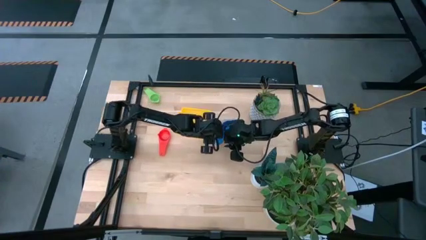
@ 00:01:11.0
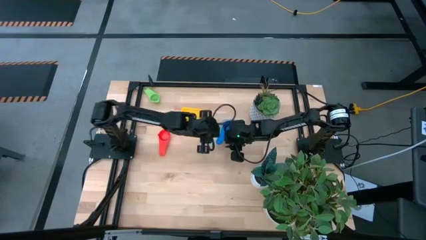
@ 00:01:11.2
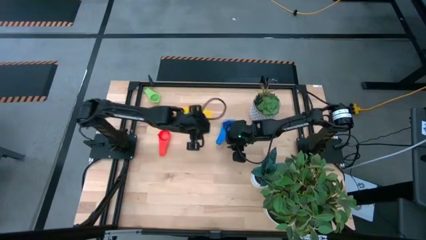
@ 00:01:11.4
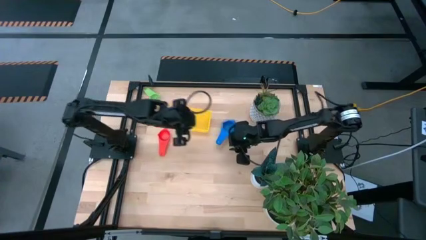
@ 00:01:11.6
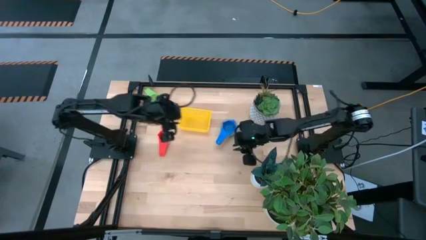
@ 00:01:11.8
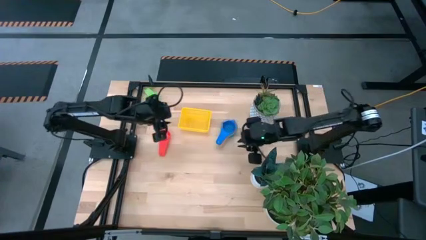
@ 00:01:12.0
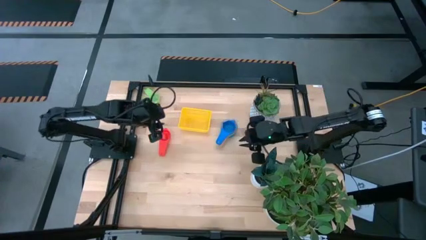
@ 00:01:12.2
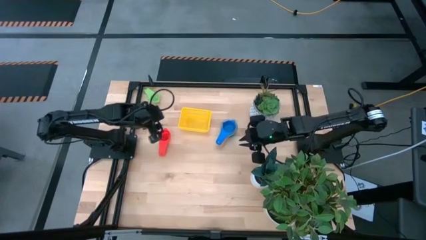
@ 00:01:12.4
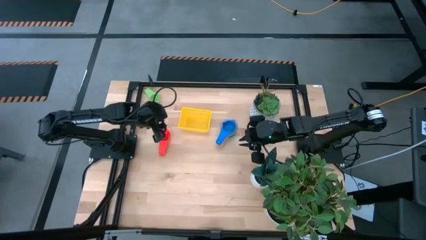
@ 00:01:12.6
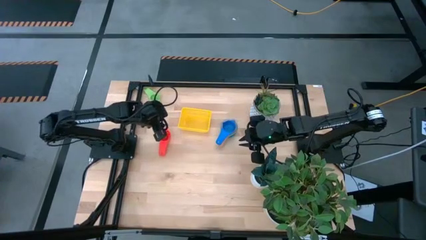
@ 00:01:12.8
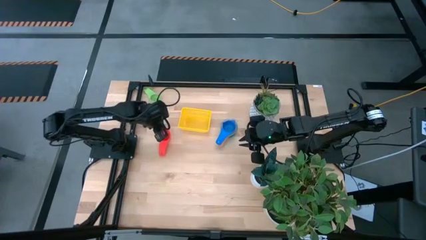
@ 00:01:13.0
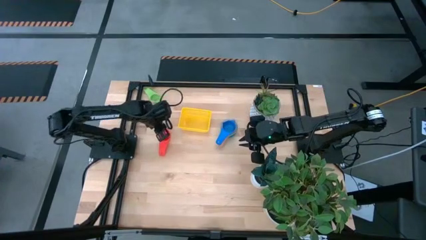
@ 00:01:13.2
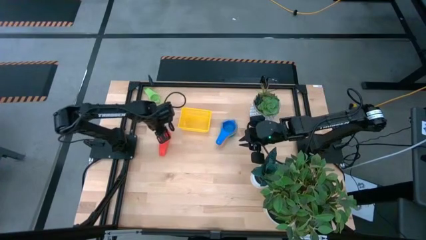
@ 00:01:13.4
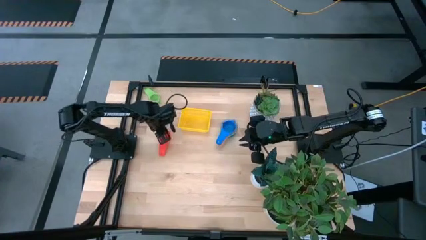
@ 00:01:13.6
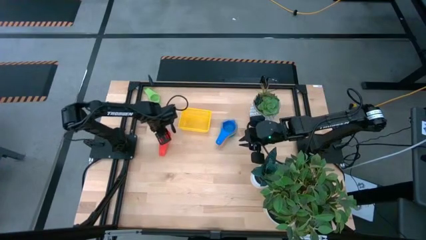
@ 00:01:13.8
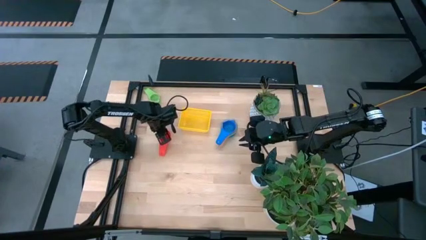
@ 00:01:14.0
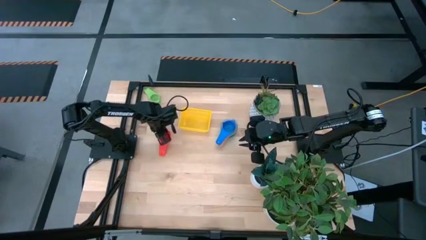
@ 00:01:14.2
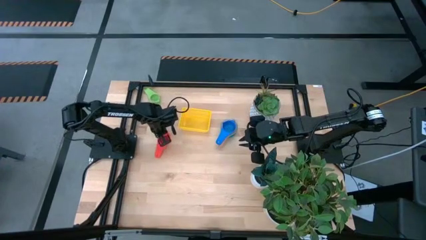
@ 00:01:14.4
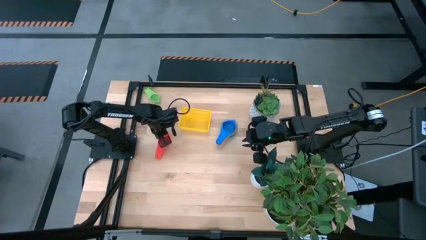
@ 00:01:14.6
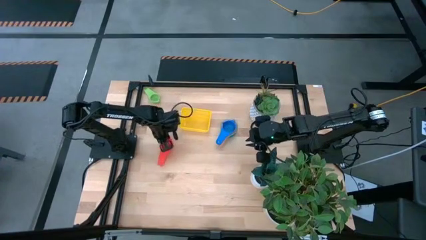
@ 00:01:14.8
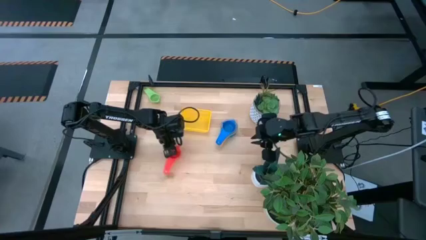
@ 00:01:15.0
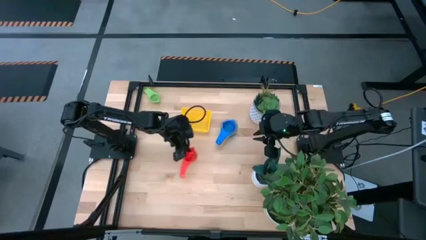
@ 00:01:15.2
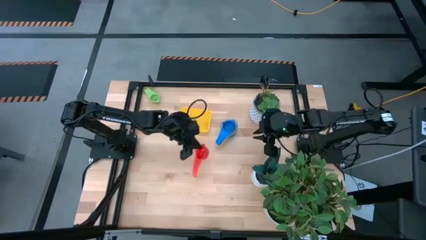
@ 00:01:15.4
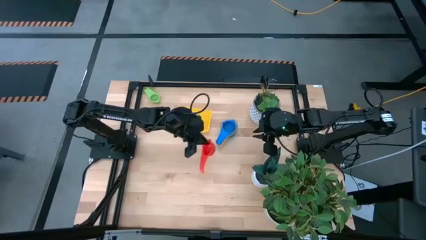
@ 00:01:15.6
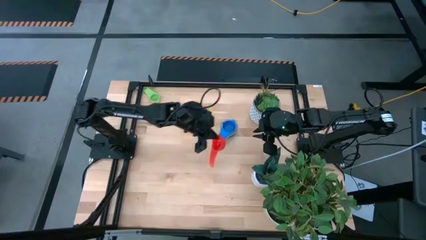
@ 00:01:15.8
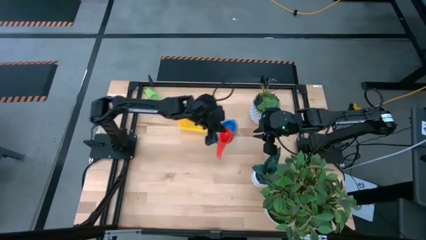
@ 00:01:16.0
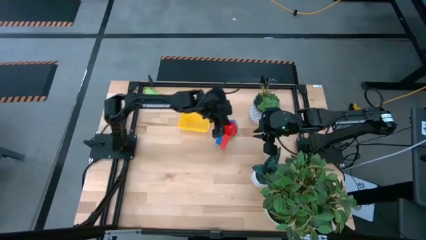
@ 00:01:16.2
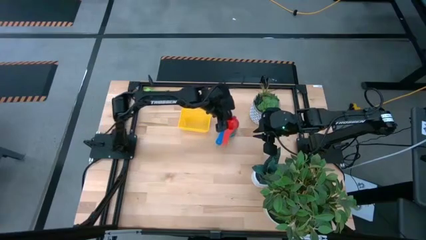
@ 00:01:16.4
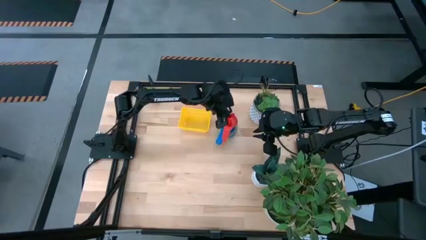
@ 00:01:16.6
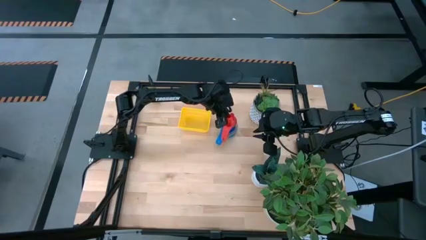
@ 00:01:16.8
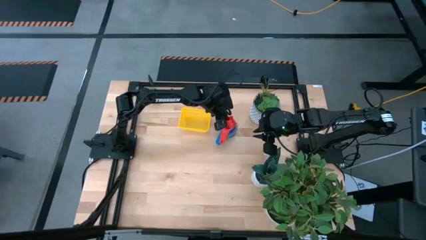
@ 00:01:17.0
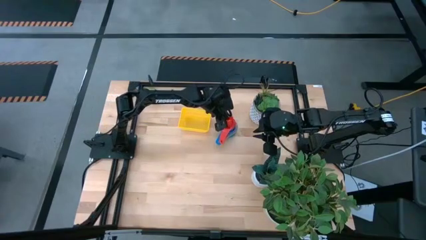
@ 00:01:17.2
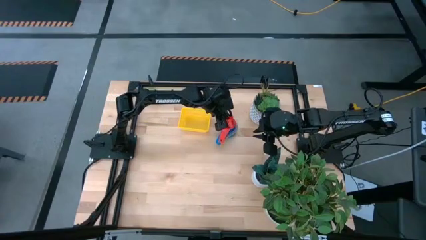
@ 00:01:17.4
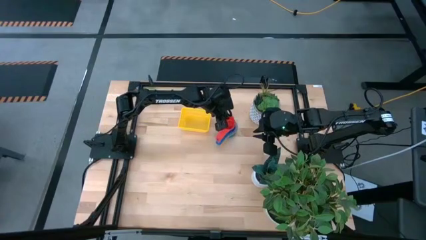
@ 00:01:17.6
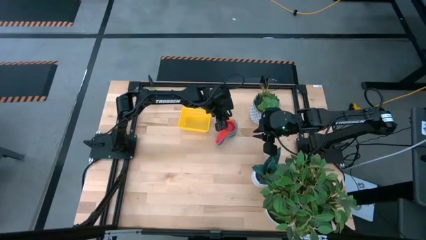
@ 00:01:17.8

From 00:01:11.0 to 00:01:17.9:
Task: Nest measuring cups in basket
Stack the red measuring cup into the blue measuring cup

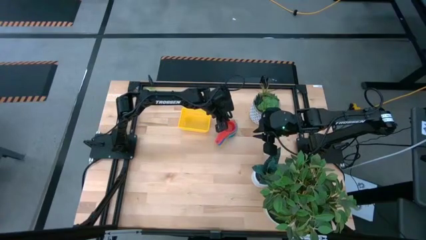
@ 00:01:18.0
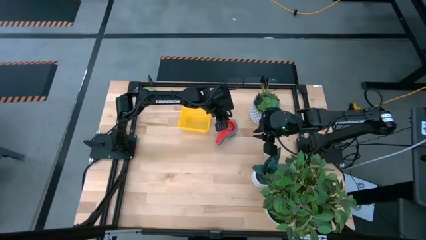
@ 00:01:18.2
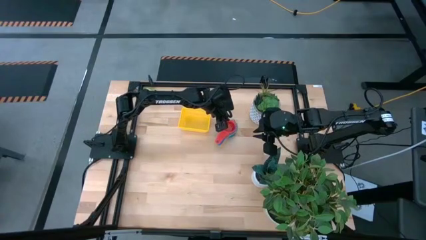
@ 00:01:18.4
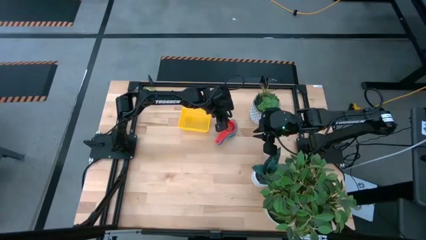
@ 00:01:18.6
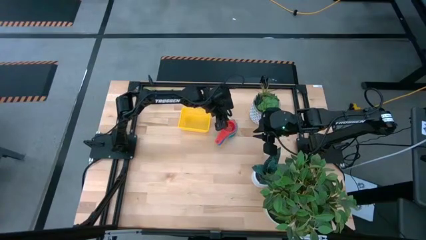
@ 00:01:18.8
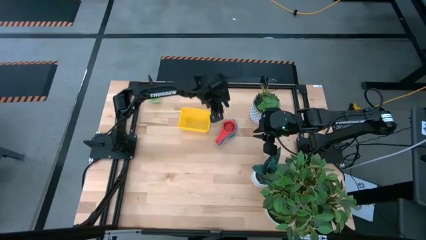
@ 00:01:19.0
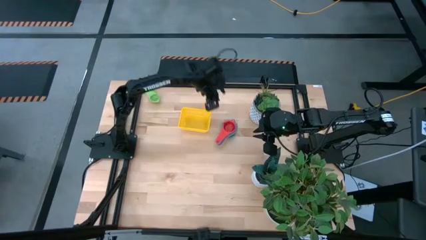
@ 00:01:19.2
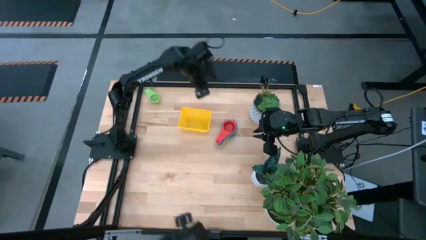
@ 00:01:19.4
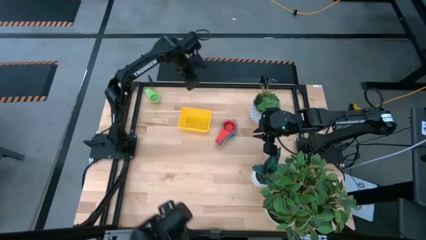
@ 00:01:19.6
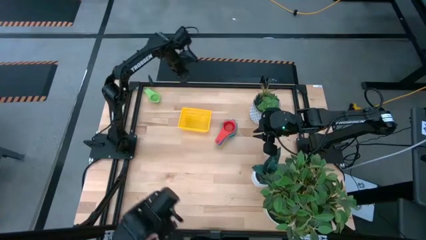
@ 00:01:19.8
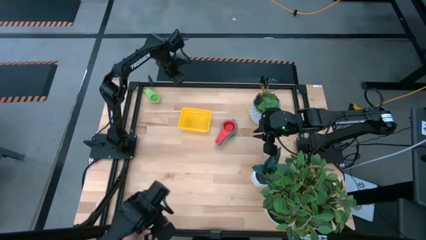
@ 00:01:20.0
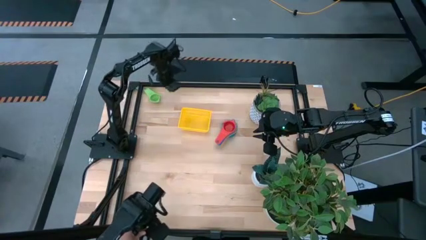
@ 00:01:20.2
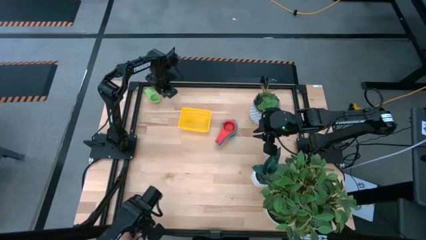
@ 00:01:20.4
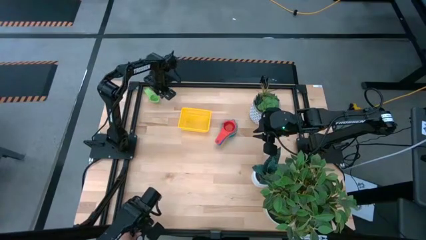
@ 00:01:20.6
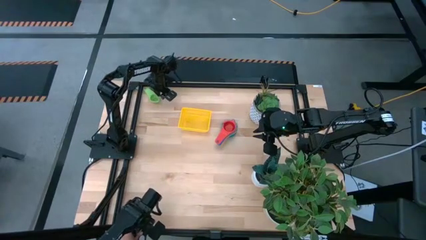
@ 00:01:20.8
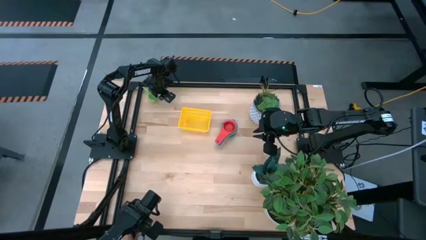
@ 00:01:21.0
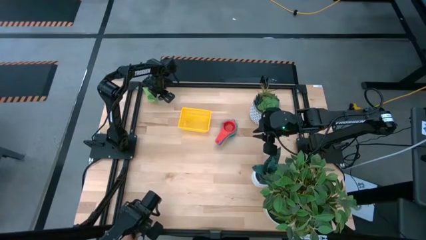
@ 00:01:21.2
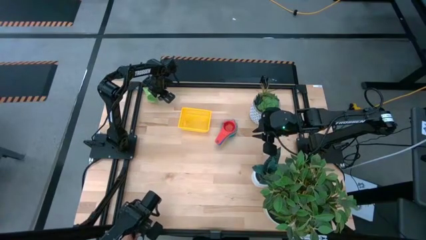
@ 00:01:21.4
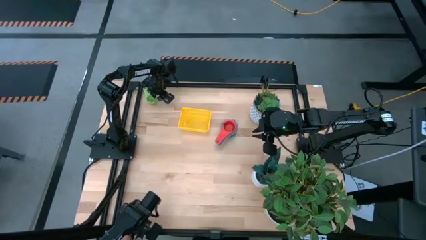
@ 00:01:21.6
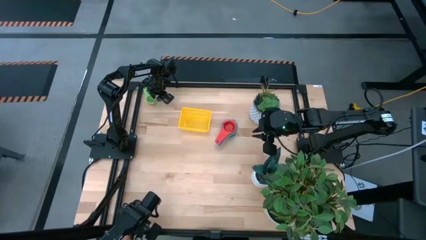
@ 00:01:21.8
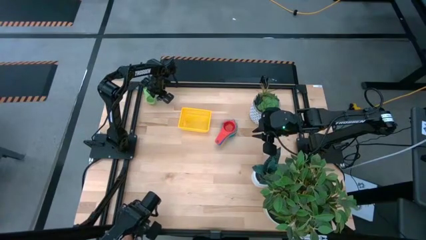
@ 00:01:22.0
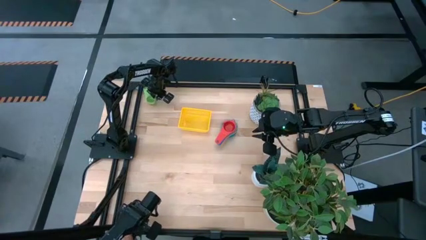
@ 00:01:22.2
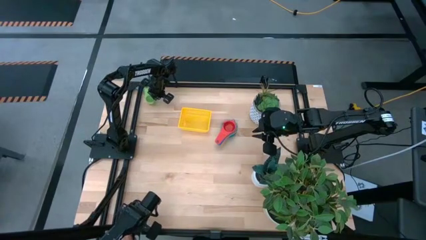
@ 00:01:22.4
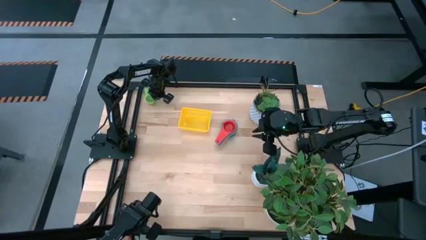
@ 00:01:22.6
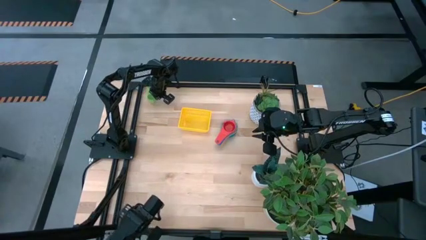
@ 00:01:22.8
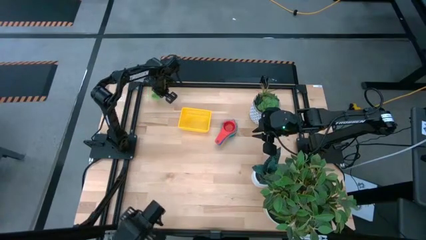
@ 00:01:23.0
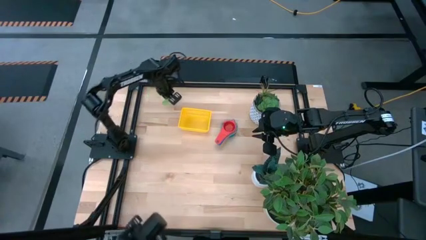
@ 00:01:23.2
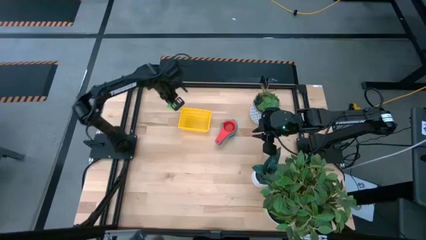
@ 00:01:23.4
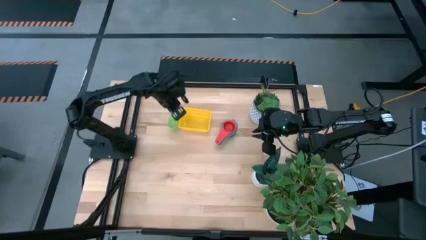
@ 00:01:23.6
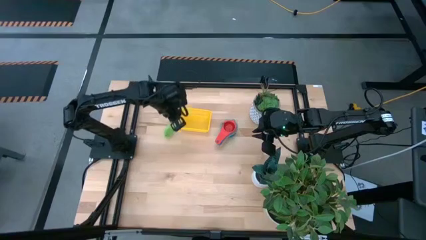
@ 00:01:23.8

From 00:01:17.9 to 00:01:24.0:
Stack the green measuring cup into the red measuring cup

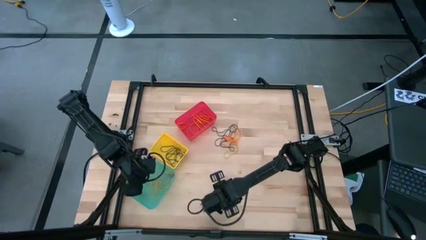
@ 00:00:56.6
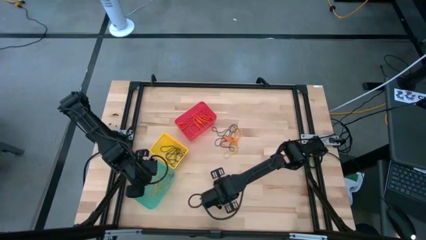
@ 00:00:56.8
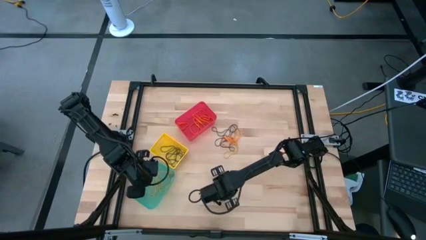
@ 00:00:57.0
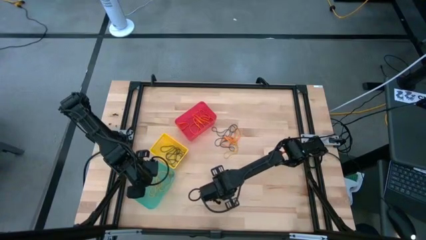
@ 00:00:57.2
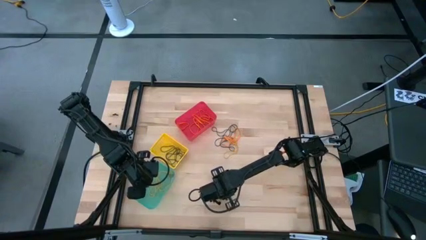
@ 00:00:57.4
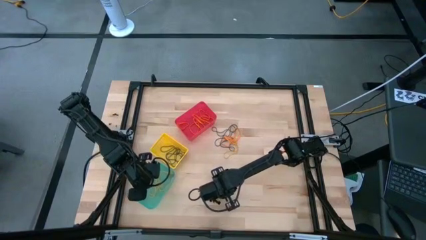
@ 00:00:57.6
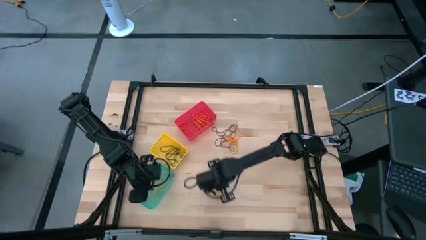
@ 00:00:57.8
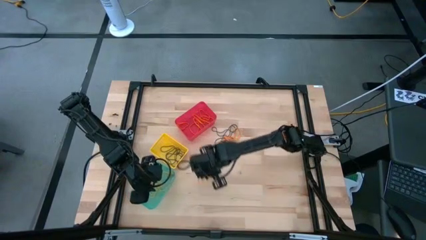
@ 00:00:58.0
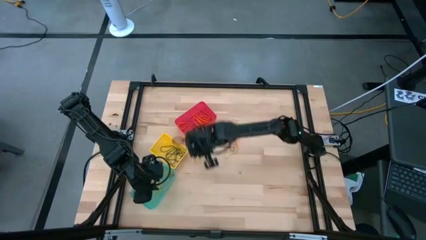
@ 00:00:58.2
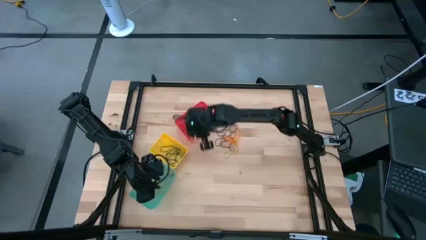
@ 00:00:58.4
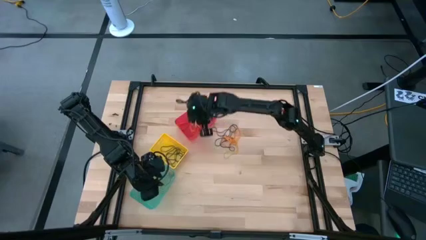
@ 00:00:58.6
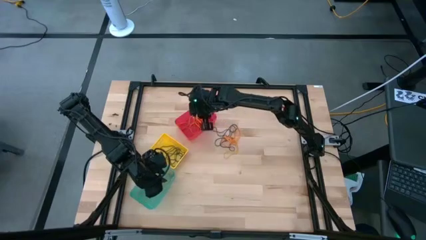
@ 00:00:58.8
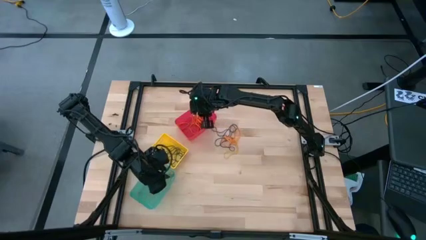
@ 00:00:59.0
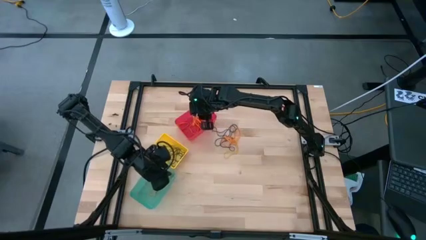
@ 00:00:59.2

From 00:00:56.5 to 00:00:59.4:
Task: Sort rubber bands into baskets
Put the orange rubber band into the red bin
